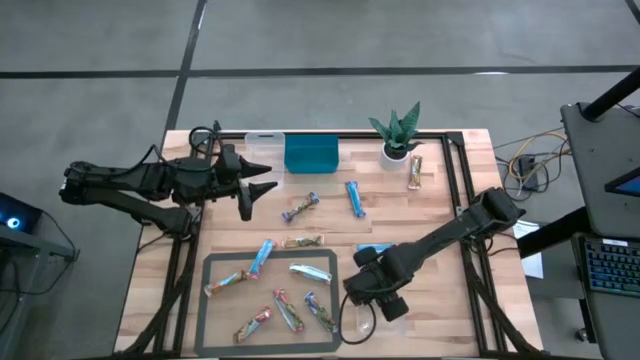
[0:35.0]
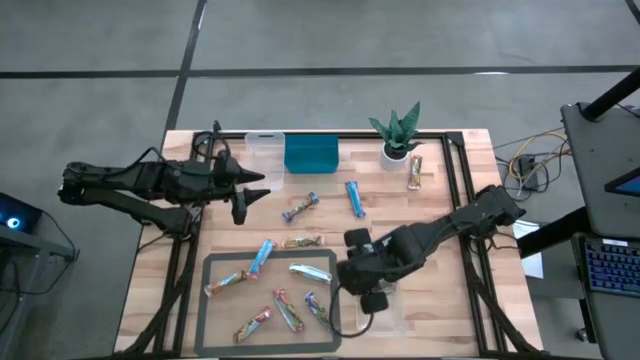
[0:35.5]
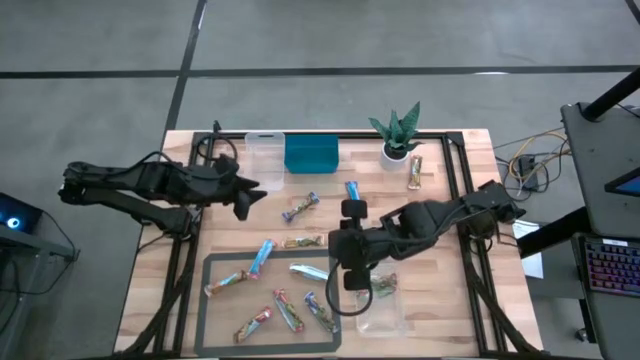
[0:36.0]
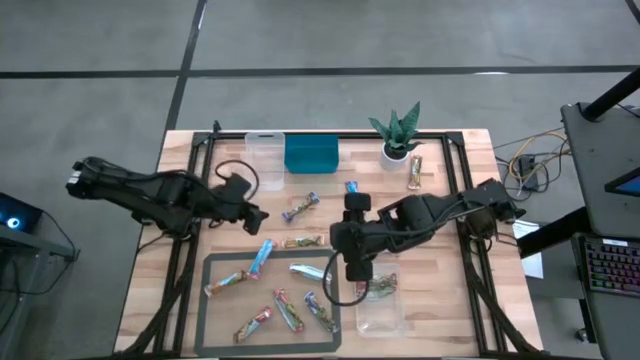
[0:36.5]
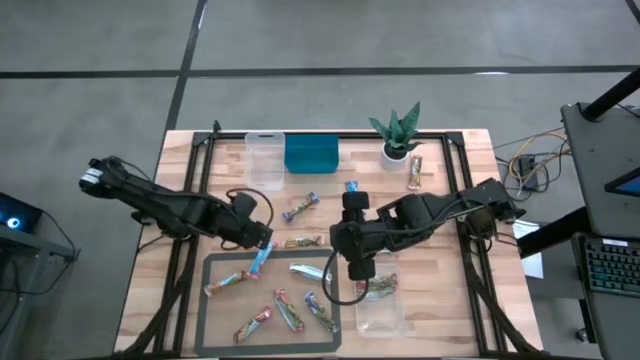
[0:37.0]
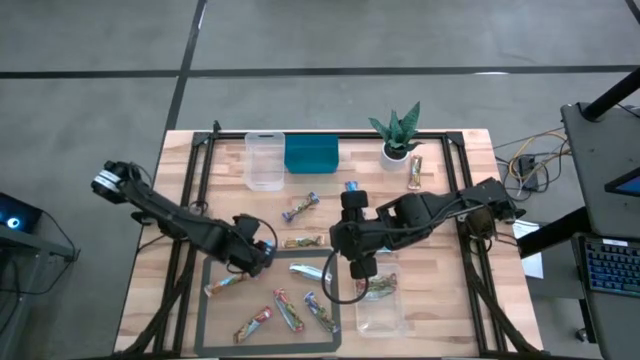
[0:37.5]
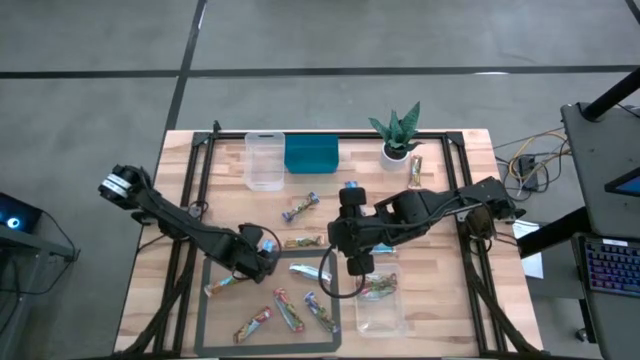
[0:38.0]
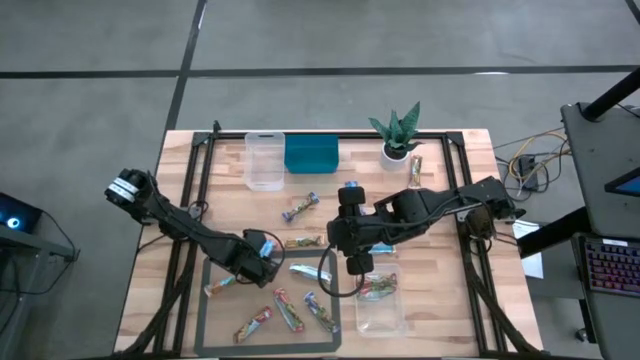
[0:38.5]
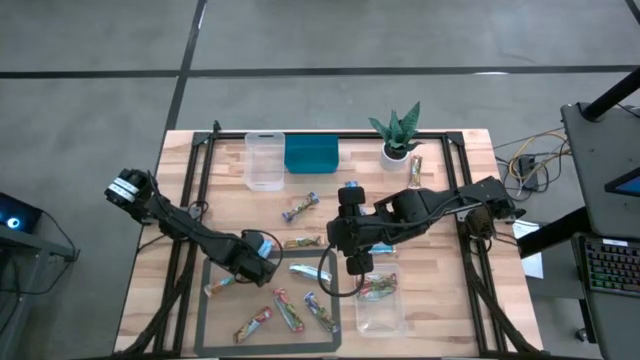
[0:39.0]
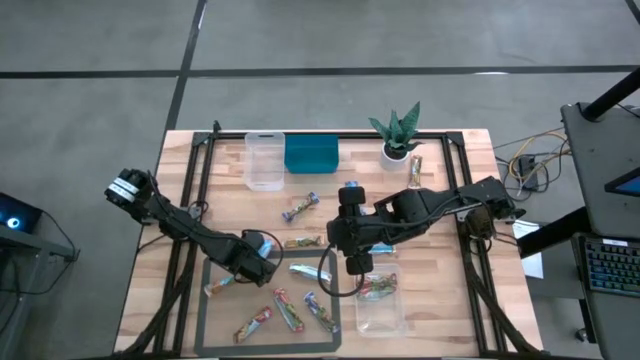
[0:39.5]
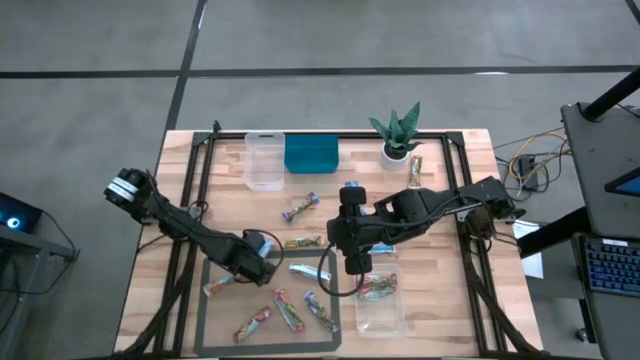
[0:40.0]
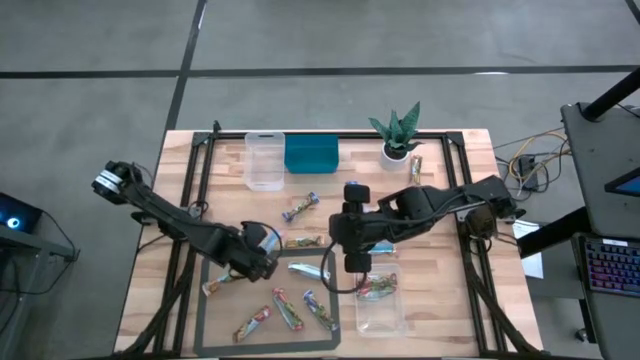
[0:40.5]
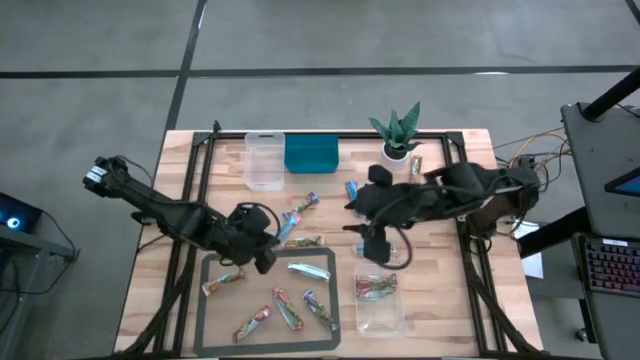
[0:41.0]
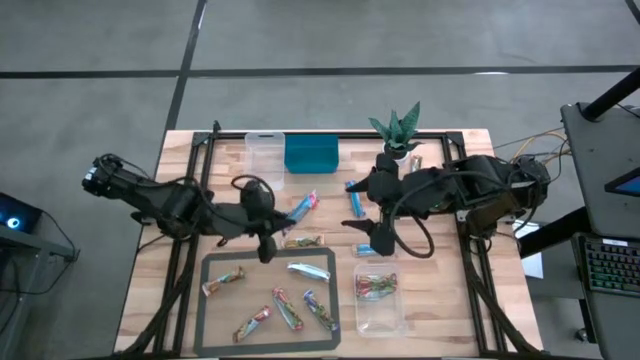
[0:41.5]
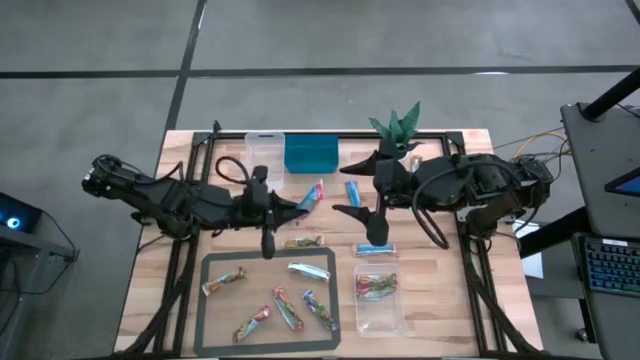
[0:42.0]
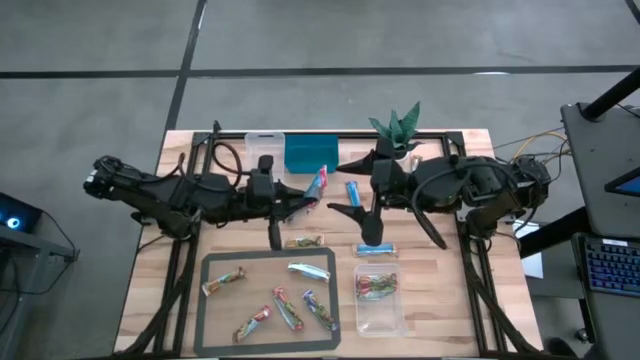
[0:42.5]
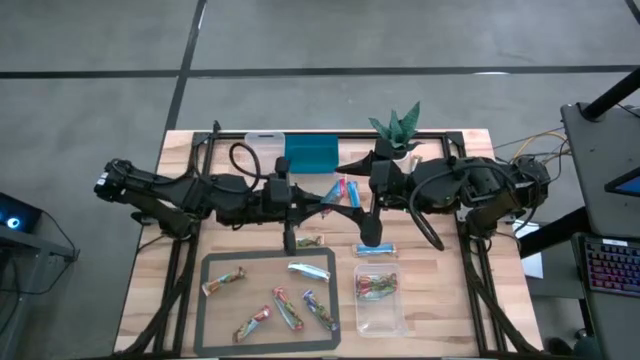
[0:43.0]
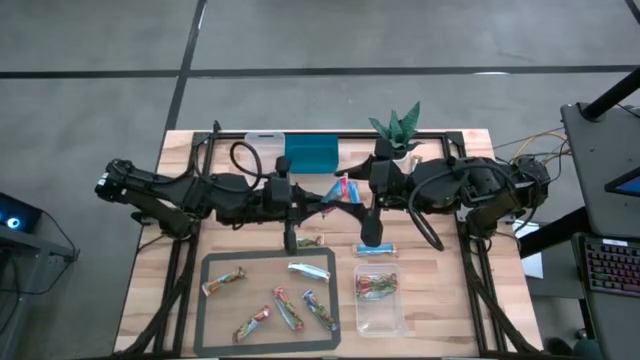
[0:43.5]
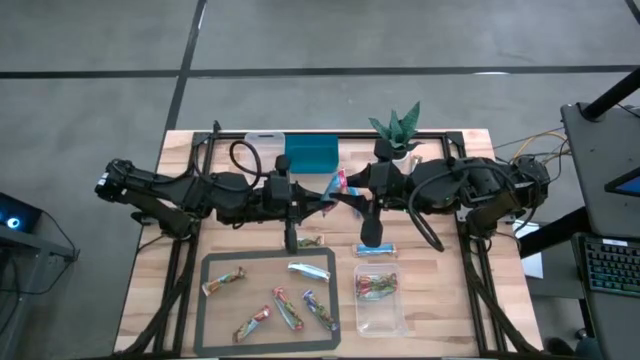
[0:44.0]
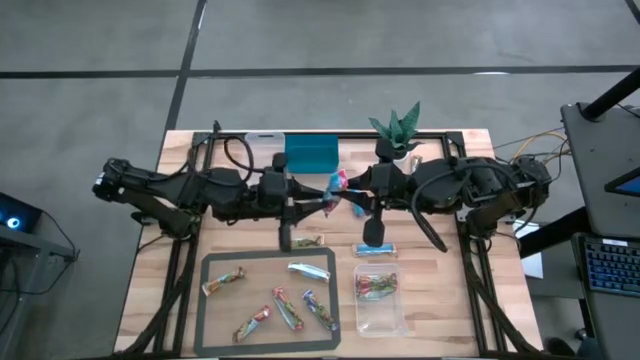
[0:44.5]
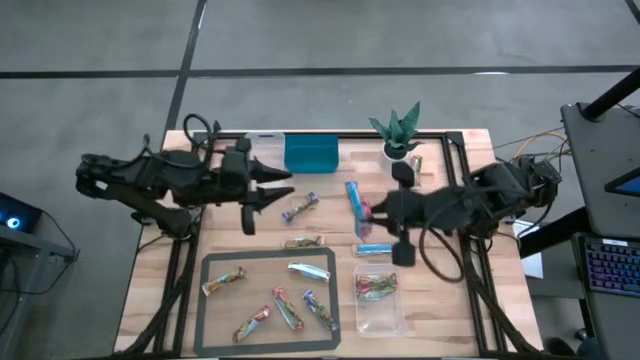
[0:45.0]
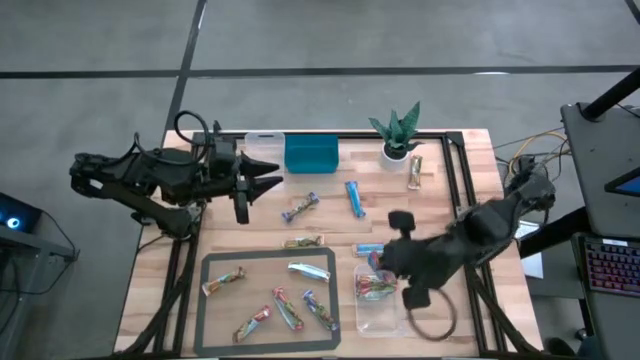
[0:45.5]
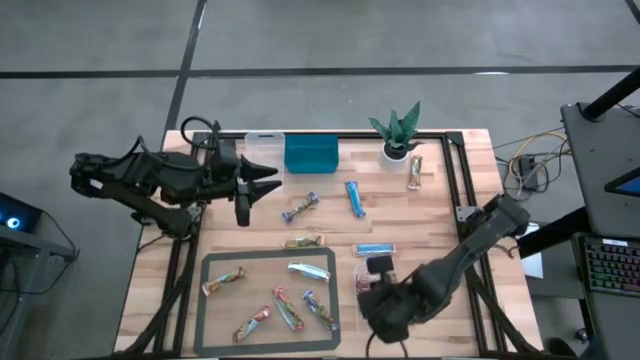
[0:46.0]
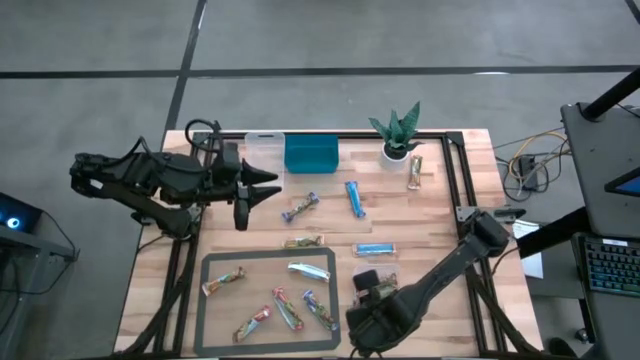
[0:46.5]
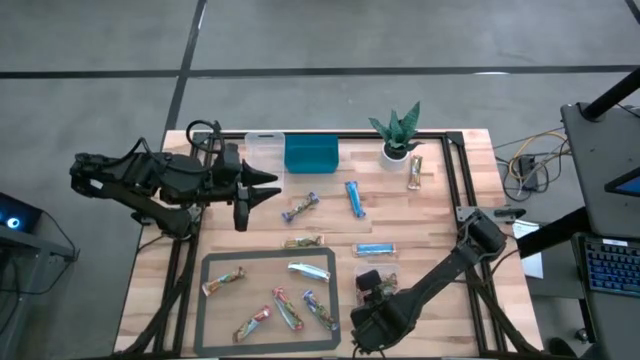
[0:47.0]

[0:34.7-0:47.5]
Task: Pick and place Granola Bars by type
Put the red granola bar into the bottom transparent bin

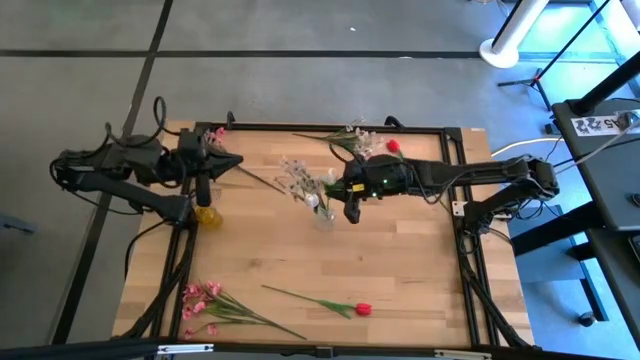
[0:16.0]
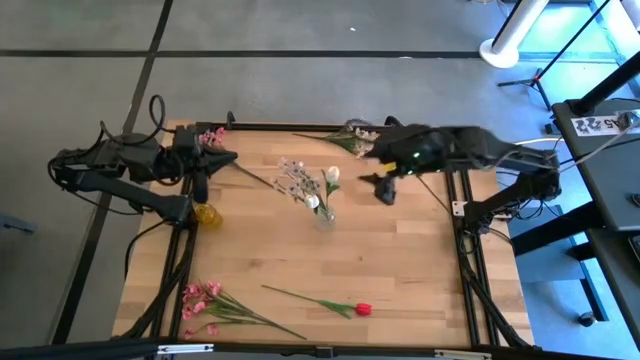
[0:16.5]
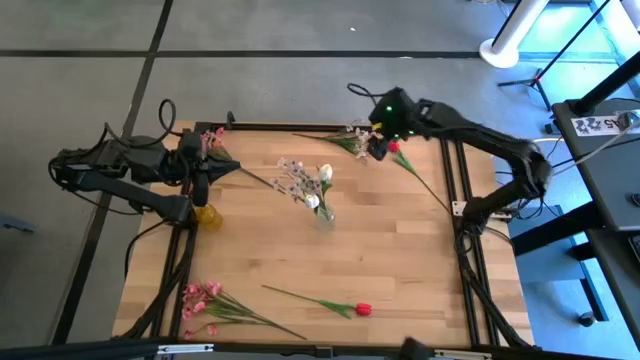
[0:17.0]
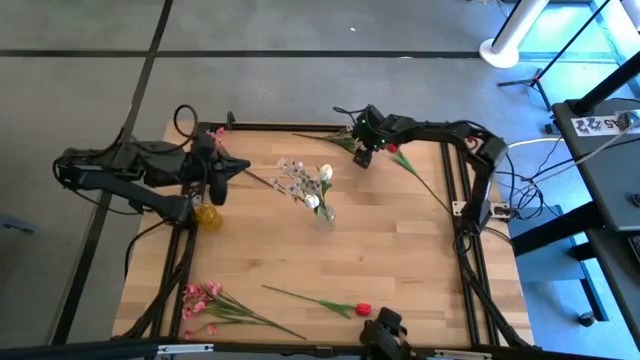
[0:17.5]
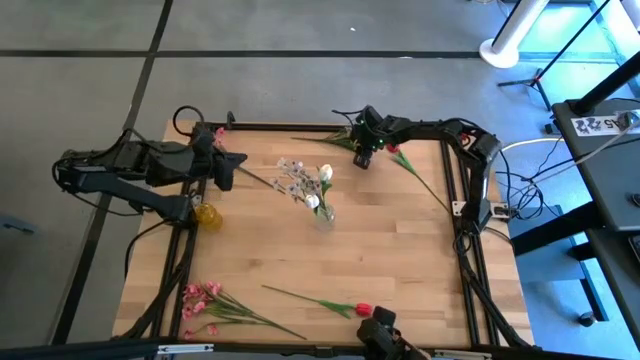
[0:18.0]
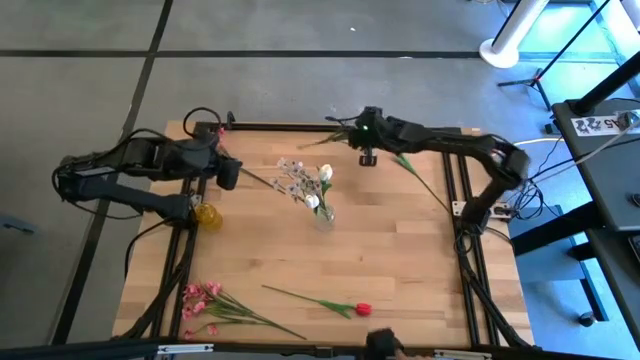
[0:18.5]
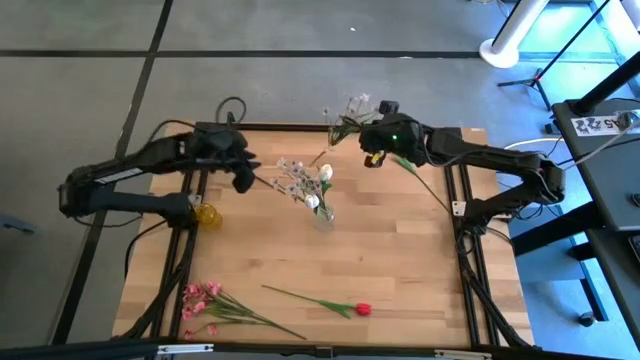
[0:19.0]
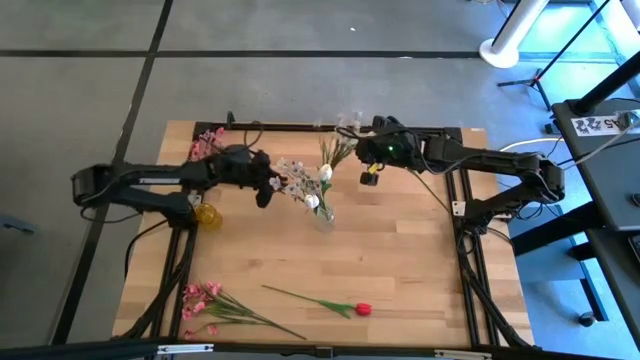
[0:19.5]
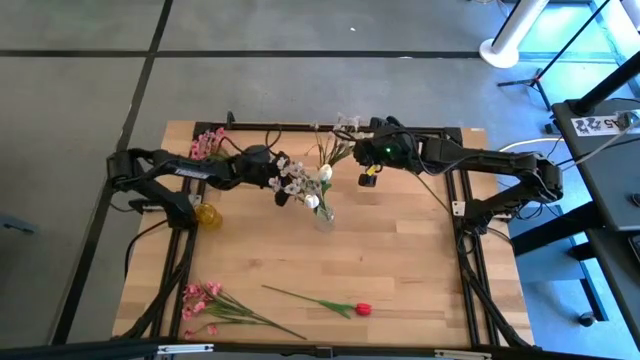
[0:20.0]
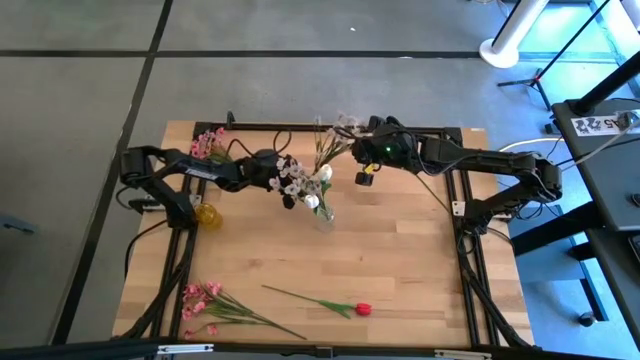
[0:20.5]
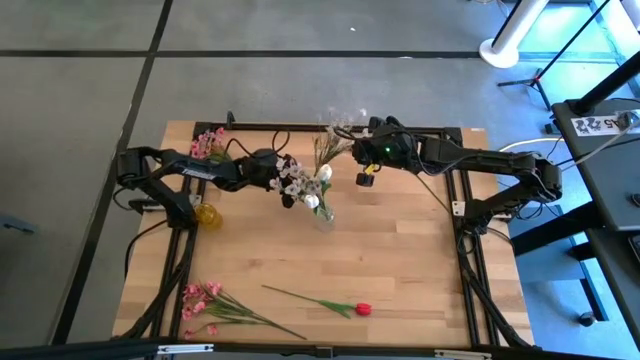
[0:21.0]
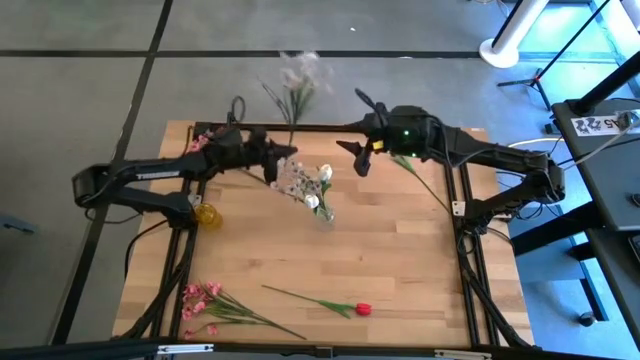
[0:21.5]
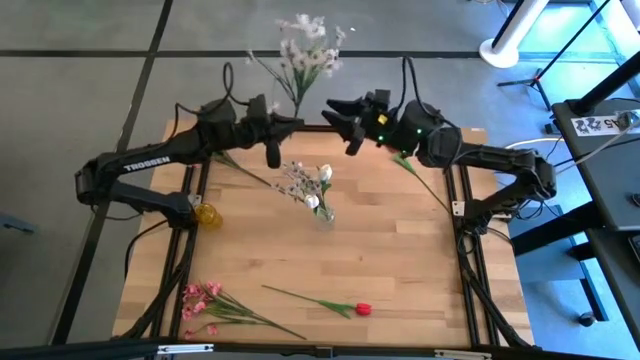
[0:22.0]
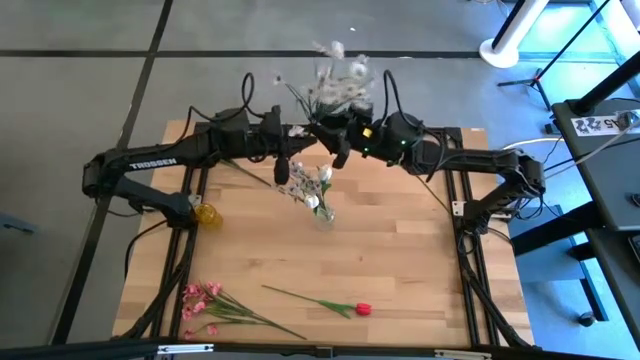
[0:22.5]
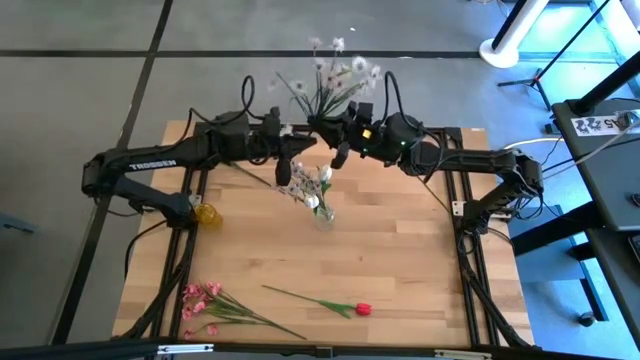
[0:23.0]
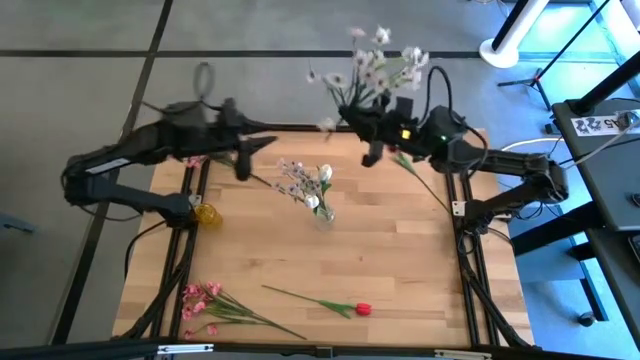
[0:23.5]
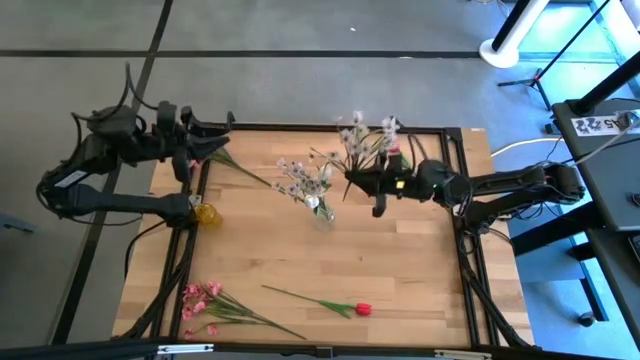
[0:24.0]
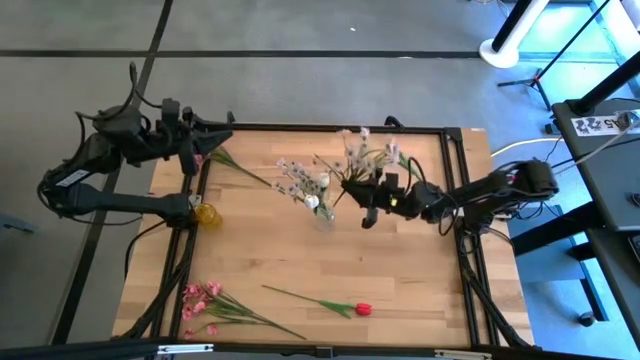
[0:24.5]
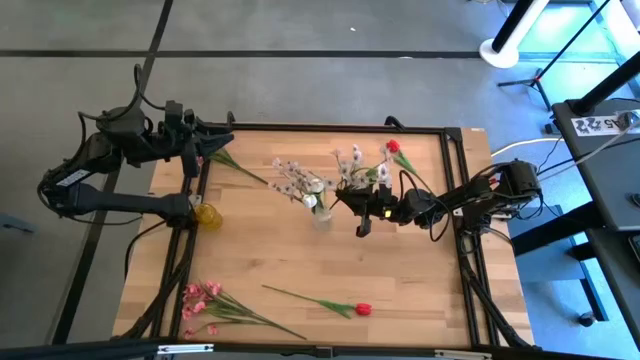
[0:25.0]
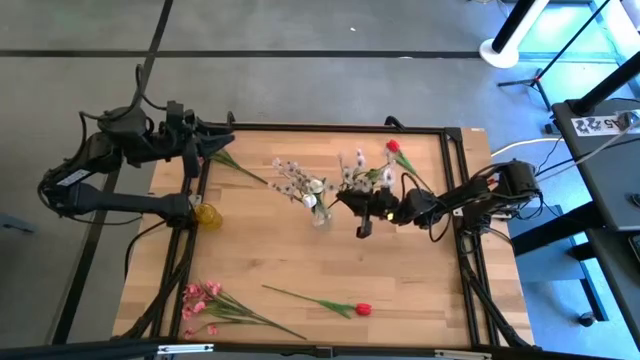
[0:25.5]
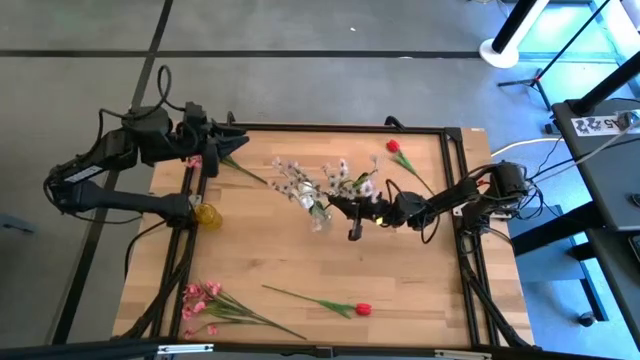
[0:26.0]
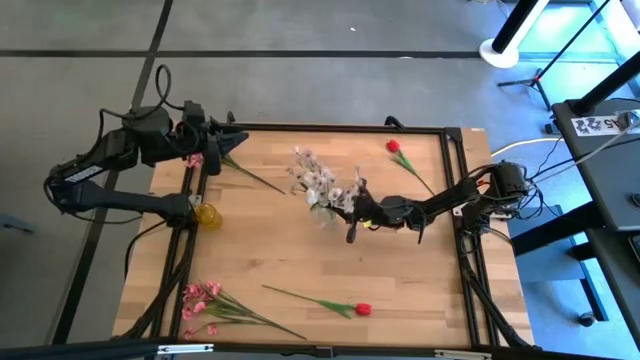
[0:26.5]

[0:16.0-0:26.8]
Task: Sort flowers into vase by color
Put the white flower into the transparent vase
